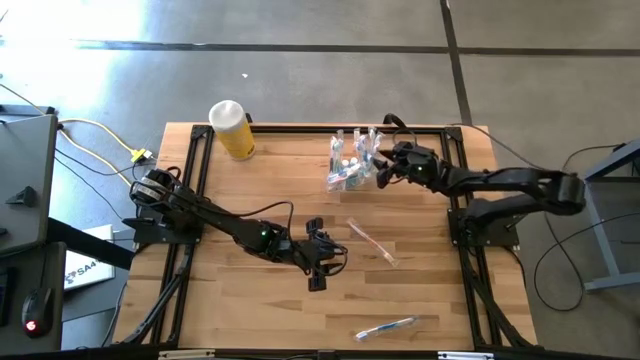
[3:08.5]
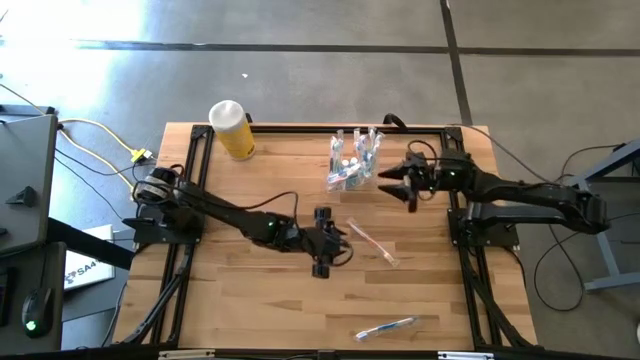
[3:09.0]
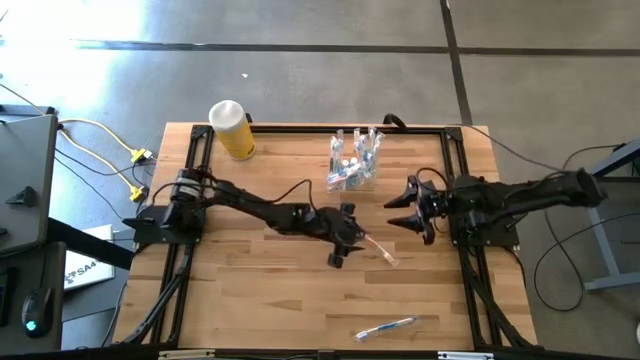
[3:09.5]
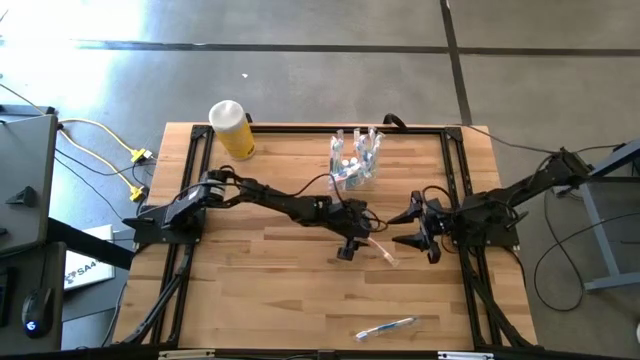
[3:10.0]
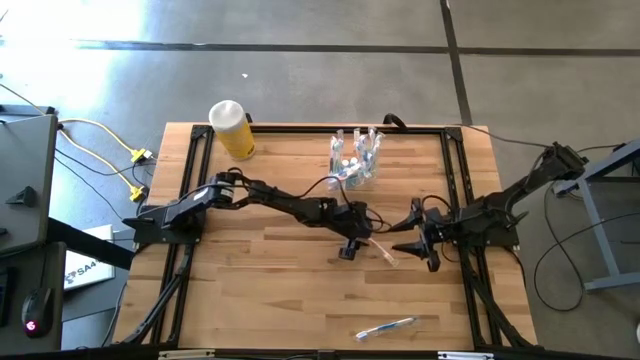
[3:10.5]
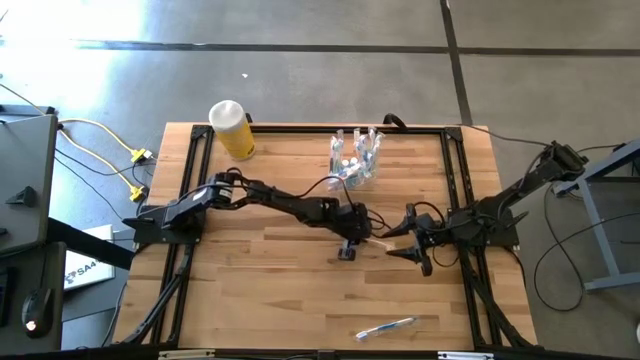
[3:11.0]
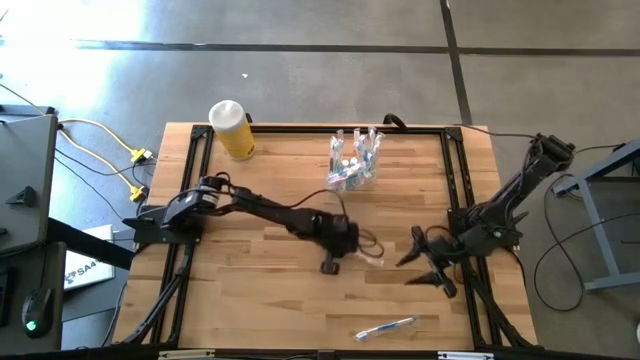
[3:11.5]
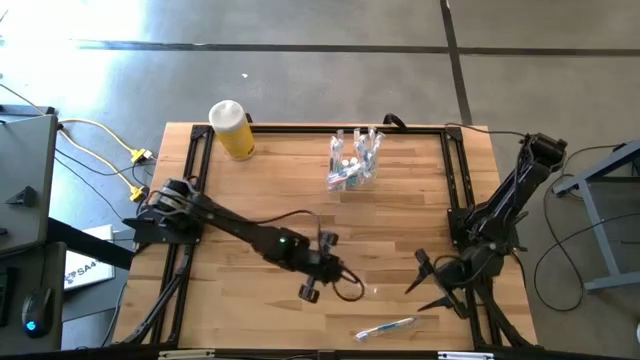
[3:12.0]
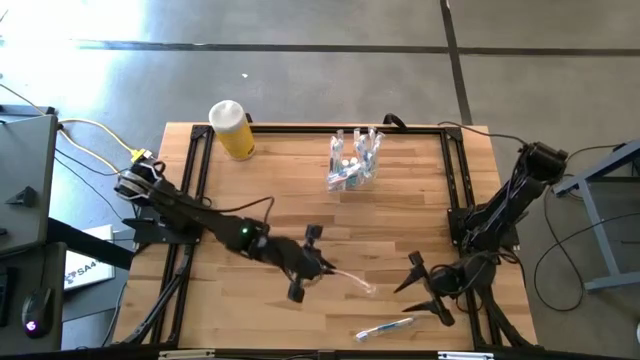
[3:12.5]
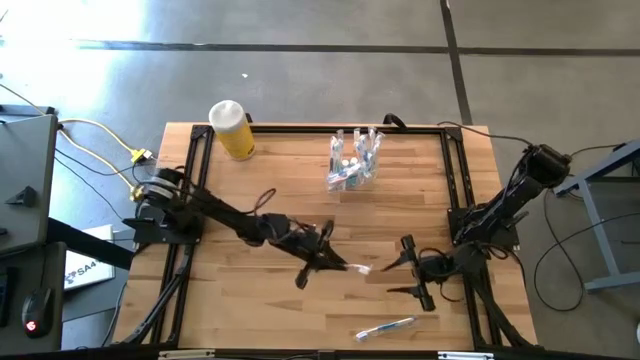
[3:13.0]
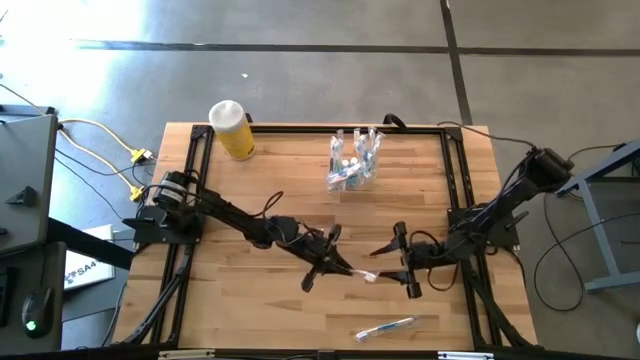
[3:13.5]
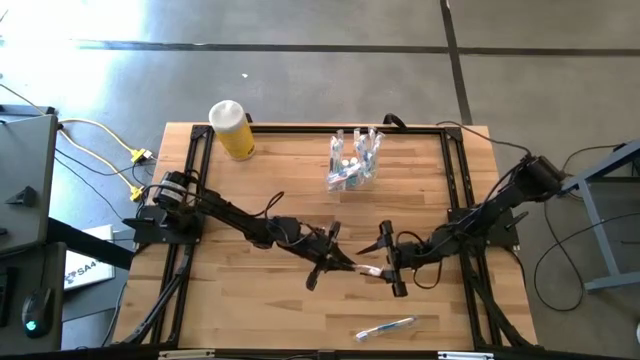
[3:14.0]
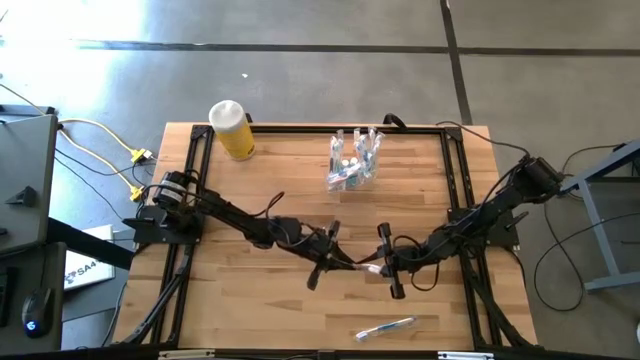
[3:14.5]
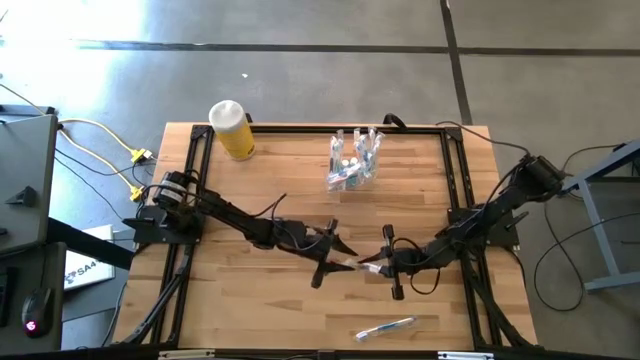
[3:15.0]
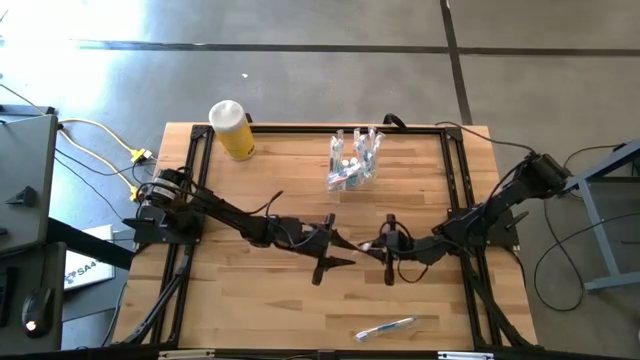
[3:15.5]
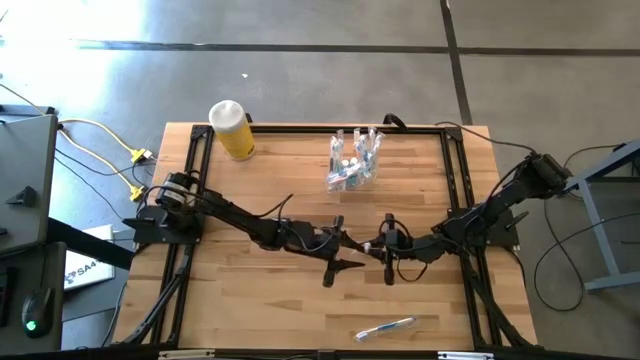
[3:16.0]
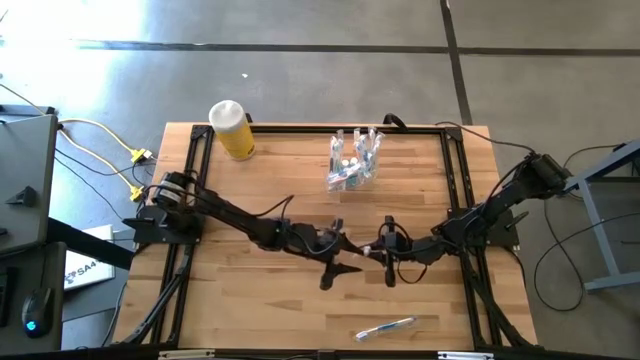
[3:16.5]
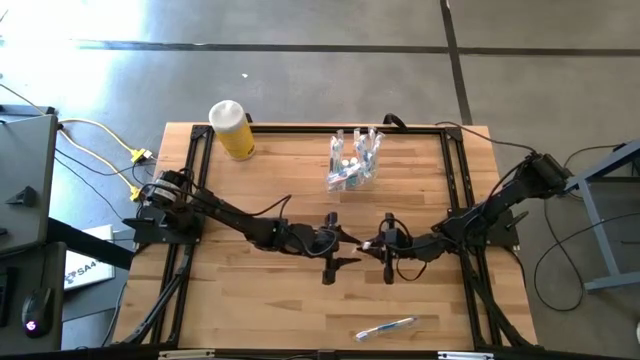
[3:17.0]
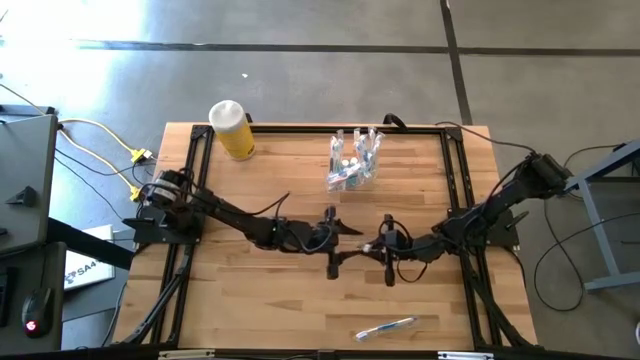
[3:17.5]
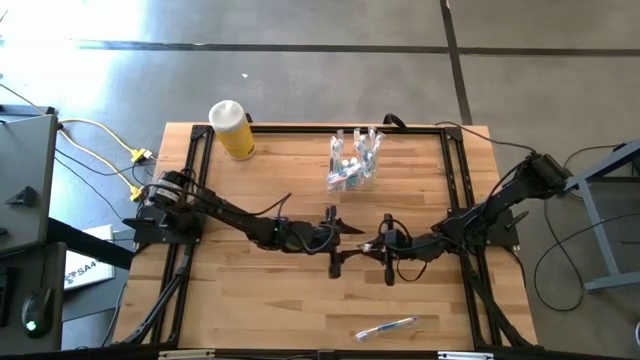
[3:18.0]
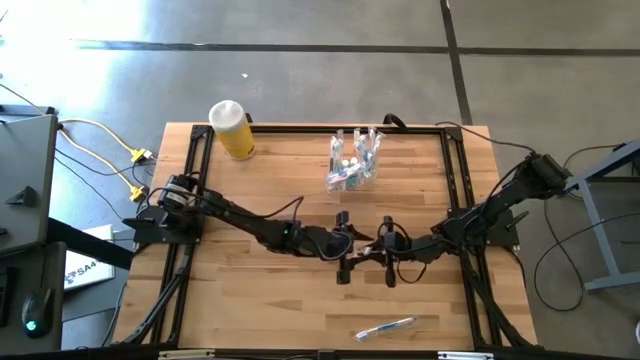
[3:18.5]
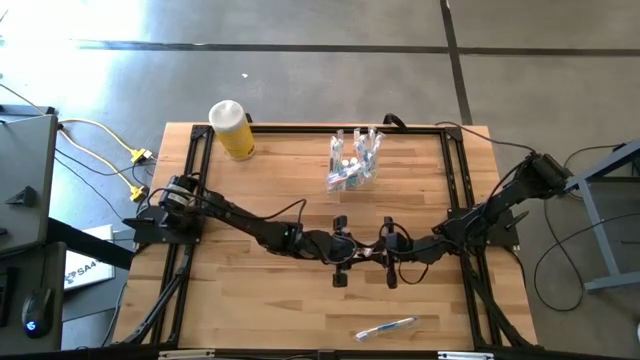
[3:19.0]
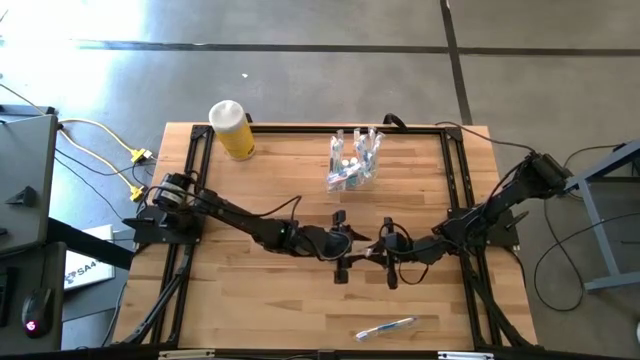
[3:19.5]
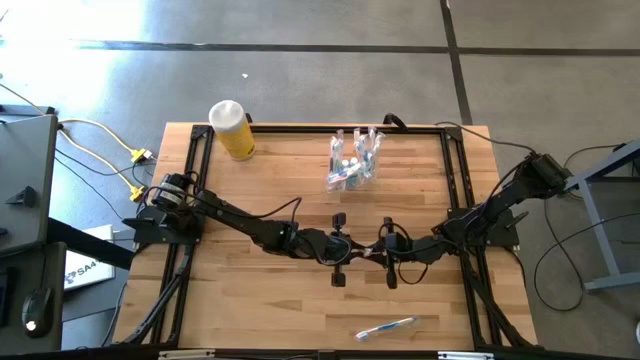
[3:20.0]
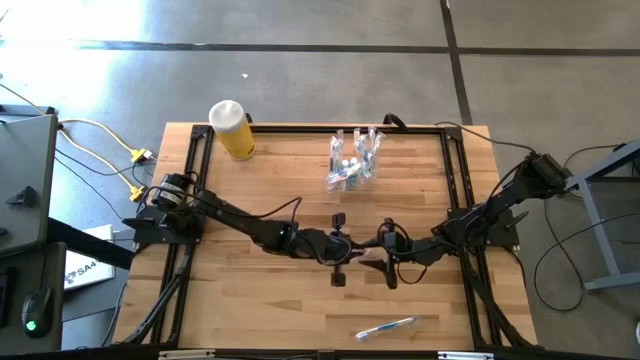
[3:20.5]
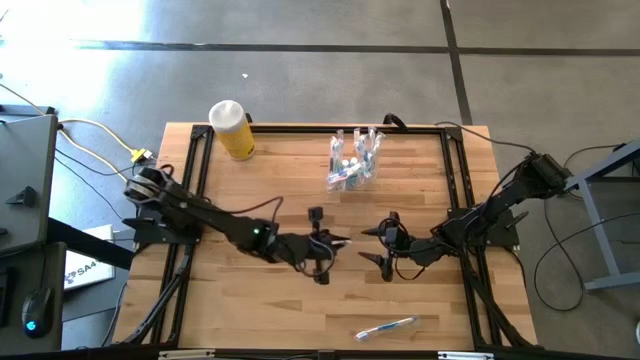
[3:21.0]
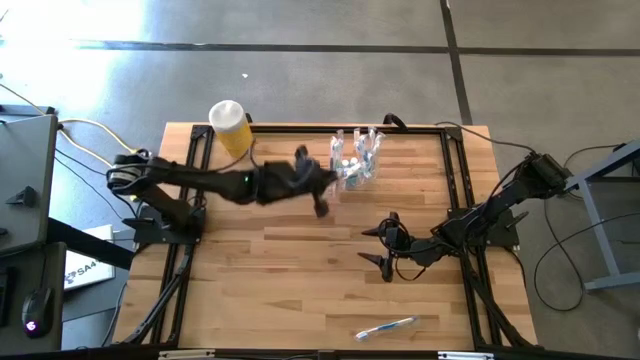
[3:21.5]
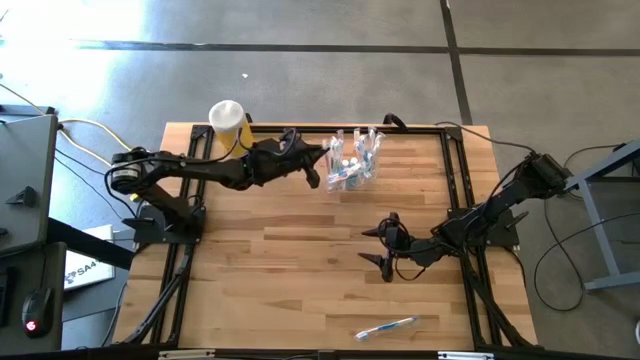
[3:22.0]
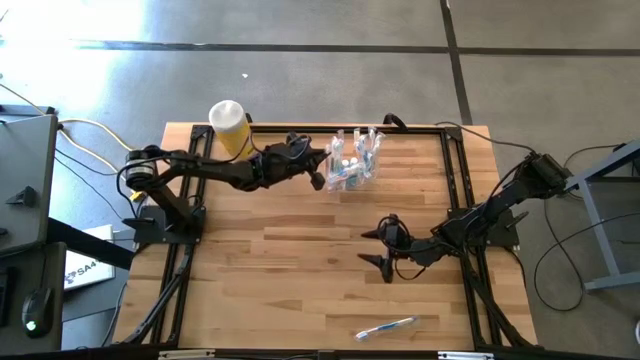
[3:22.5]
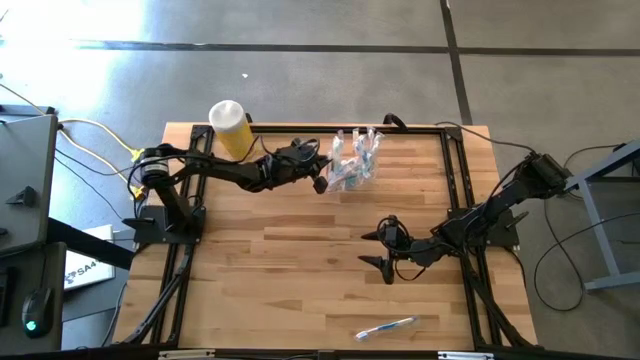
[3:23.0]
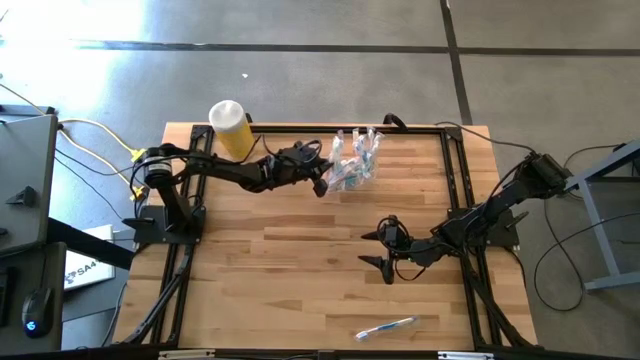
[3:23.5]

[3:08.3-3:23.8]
Task: Pick & Place toothbrushing station
Put the orange toothbrush into the transparent organizer

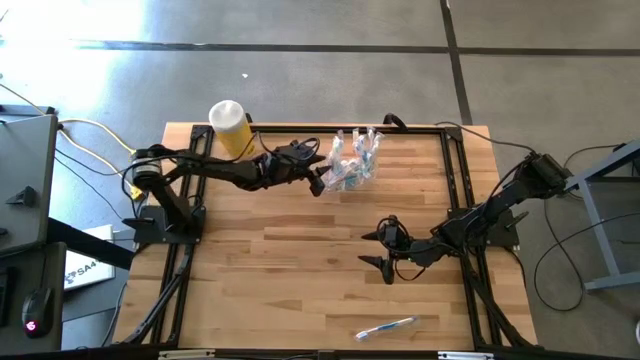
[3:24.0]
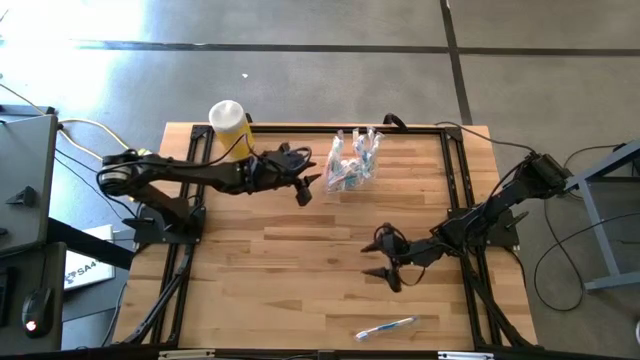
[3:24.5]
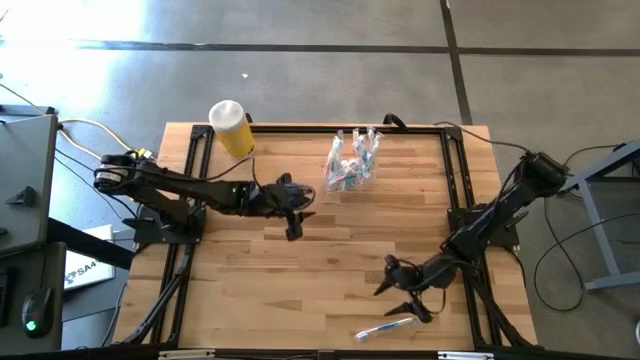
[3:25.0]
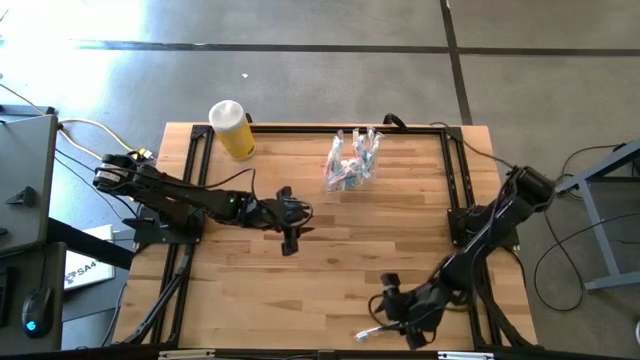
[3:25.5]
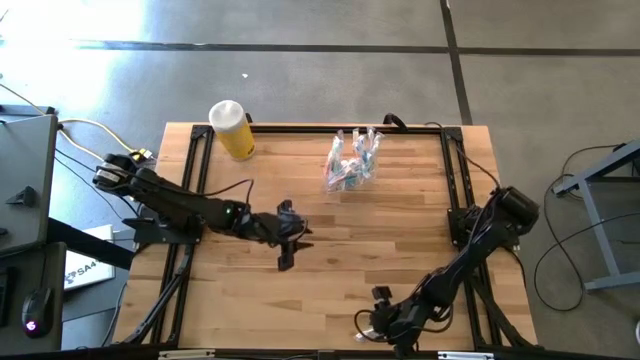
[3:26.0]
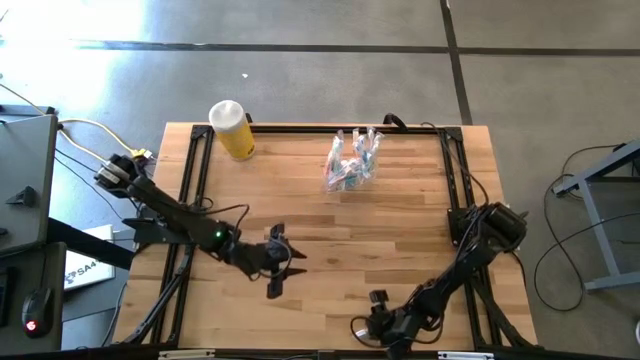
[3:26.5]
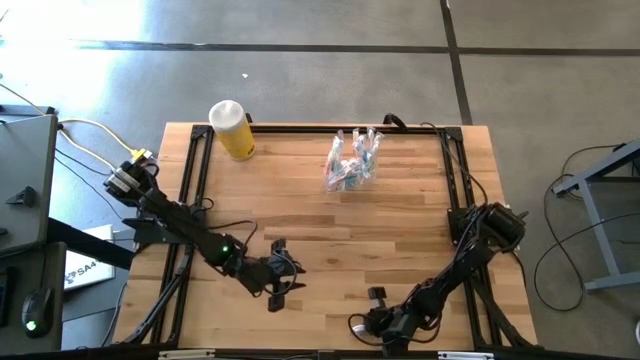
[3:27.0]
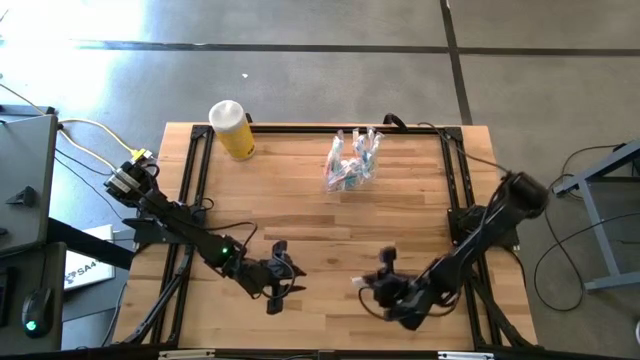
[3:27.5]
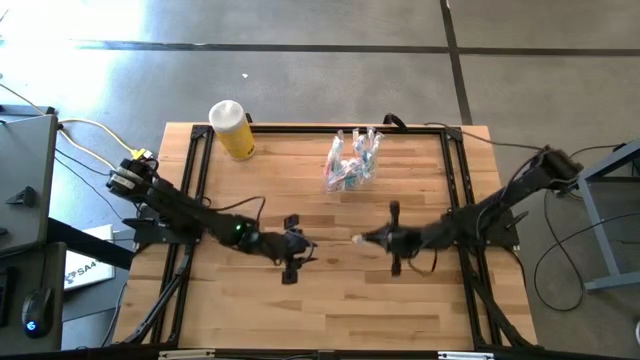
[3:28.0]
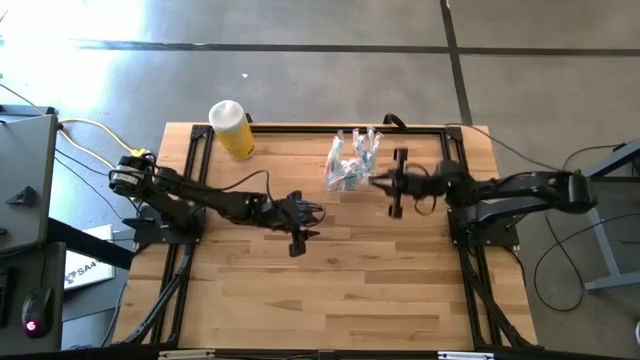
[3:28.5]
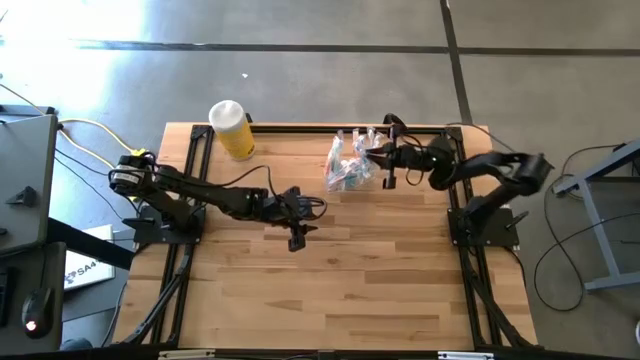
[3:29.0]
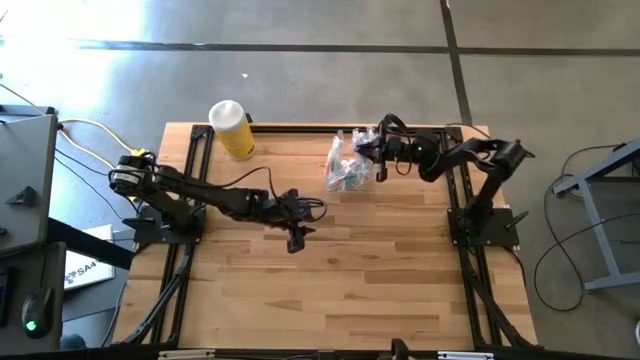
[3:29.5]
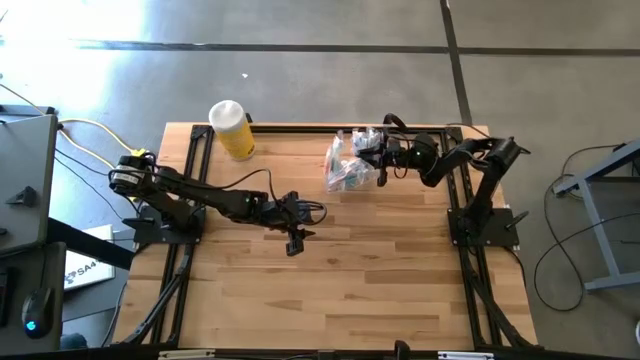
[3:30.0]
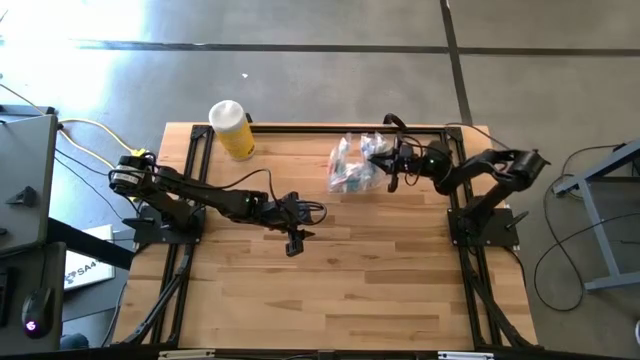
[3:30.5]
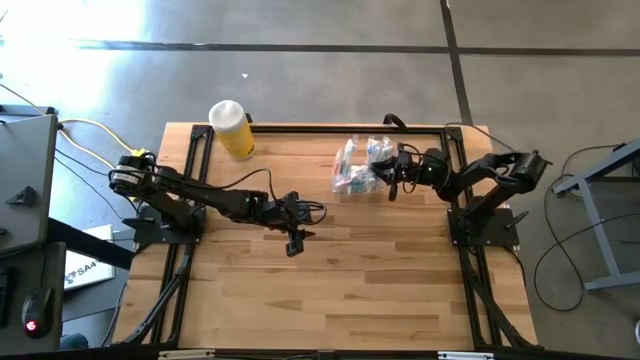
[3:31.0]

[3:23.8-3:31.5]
Put the blue toothbrush into the transparent toothbrush holder
